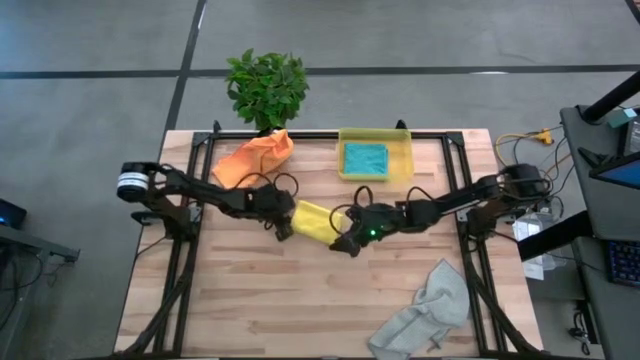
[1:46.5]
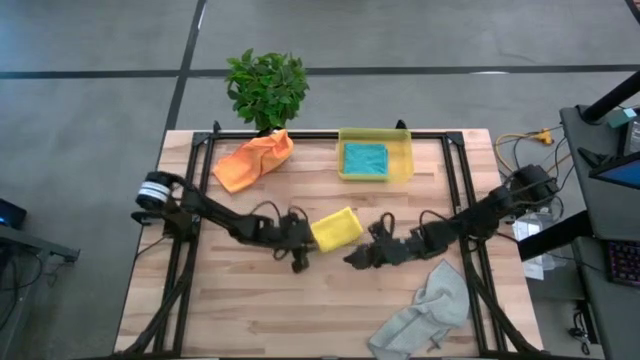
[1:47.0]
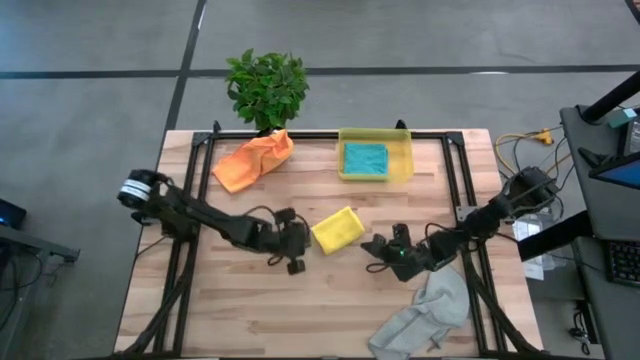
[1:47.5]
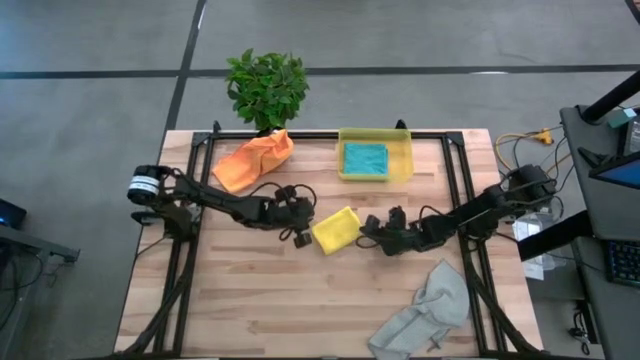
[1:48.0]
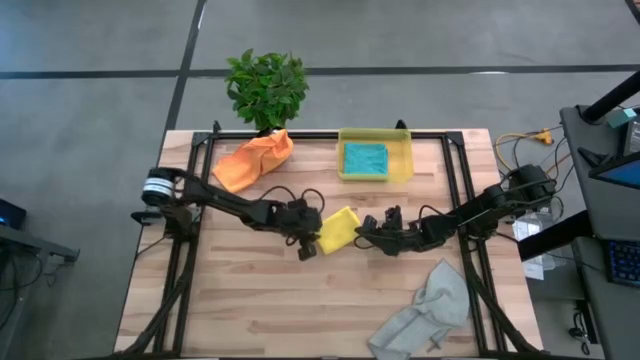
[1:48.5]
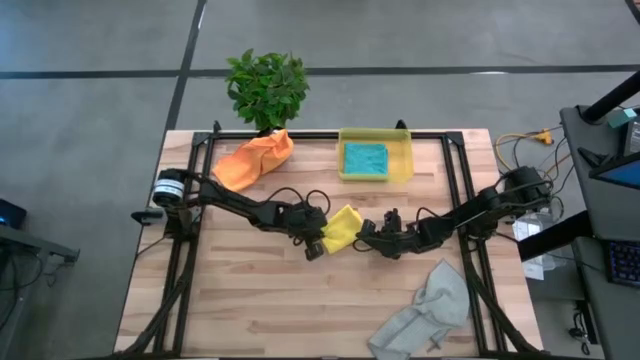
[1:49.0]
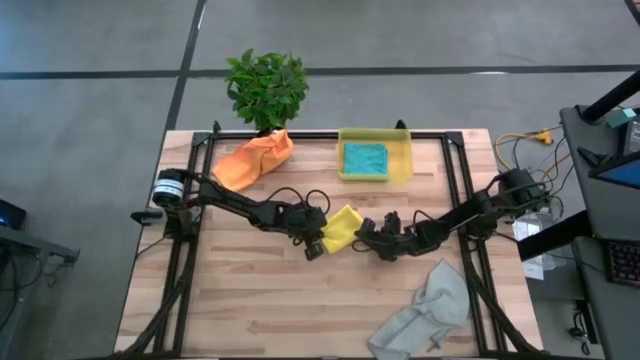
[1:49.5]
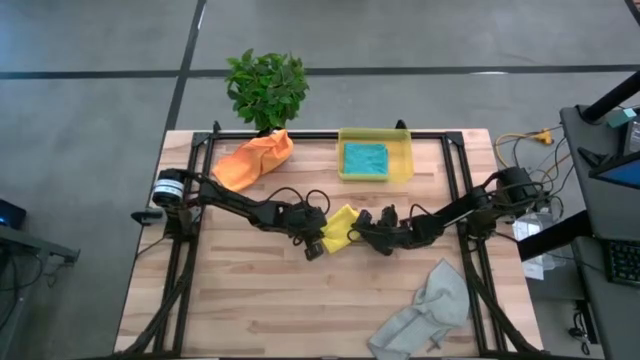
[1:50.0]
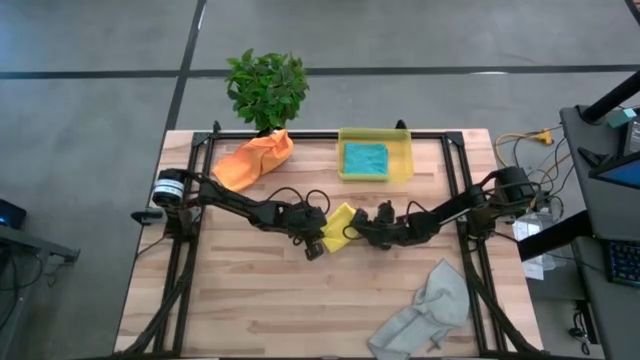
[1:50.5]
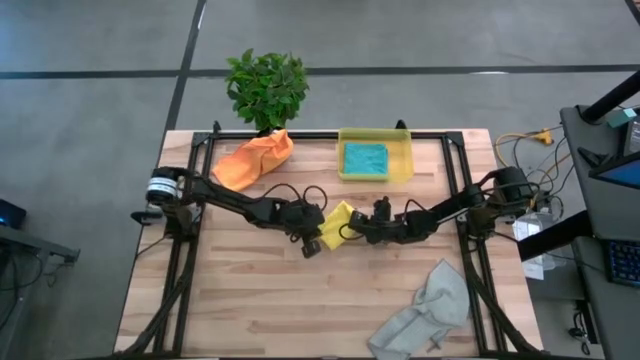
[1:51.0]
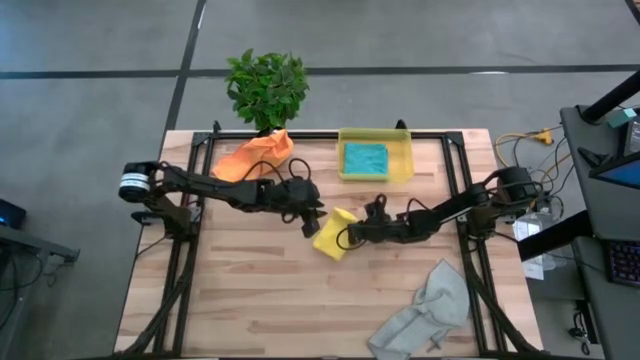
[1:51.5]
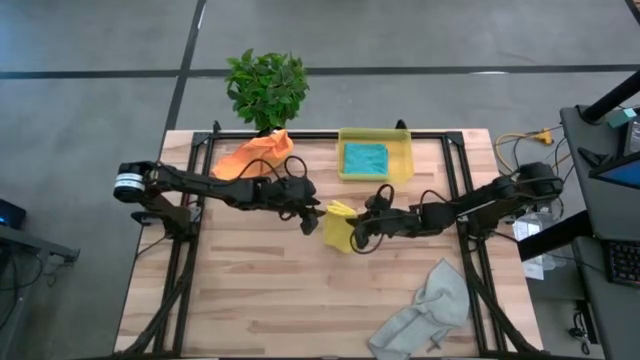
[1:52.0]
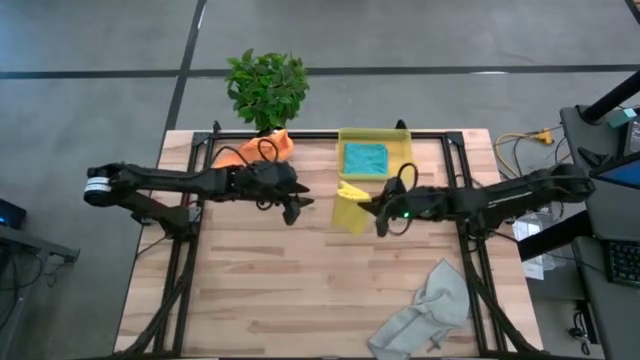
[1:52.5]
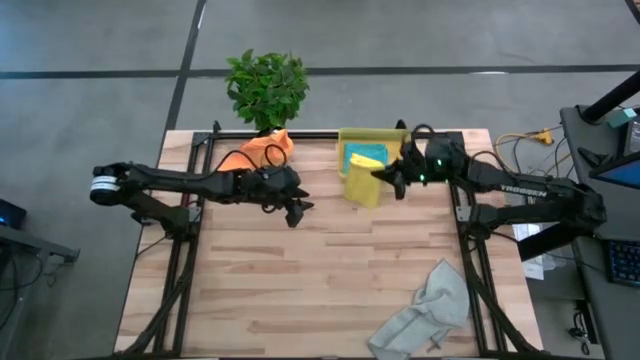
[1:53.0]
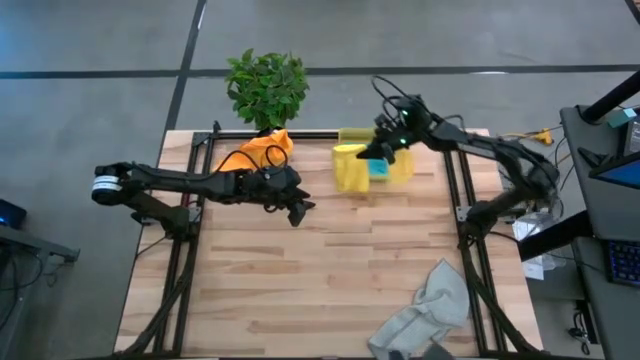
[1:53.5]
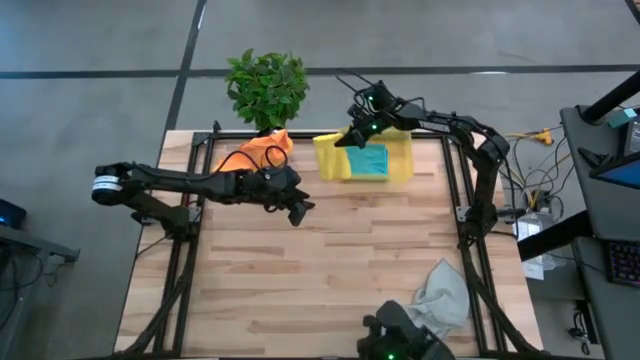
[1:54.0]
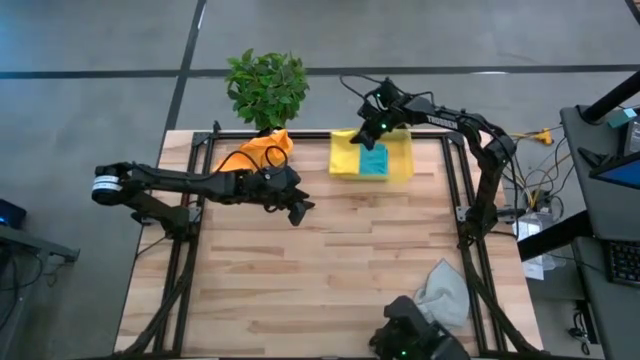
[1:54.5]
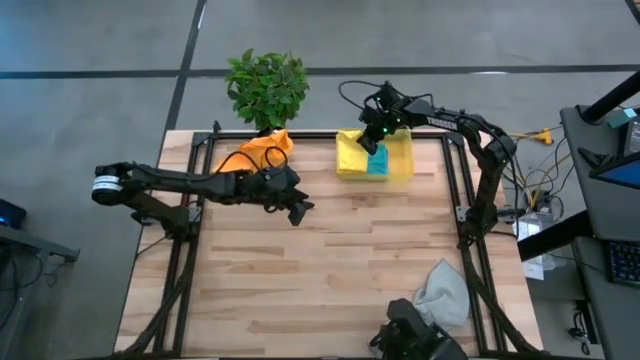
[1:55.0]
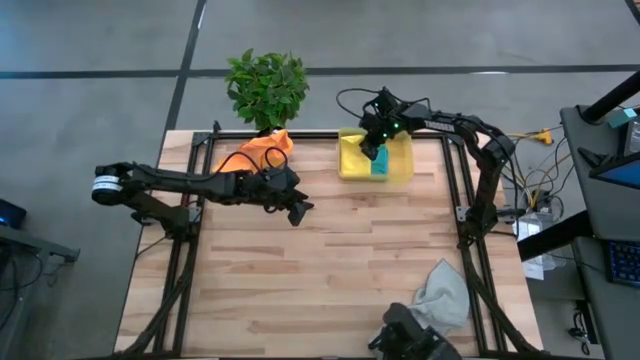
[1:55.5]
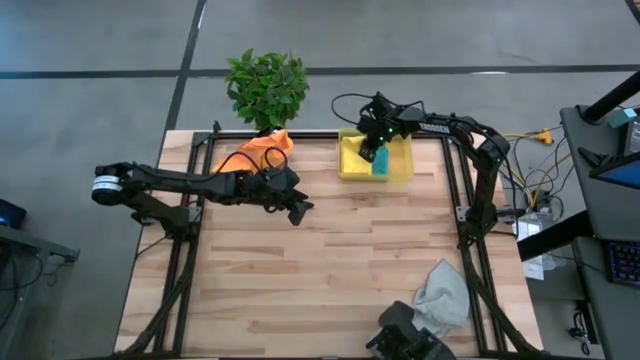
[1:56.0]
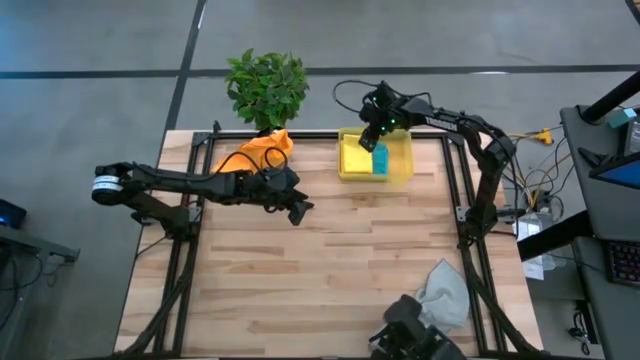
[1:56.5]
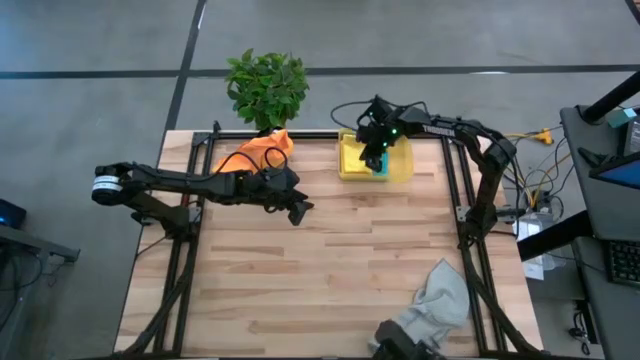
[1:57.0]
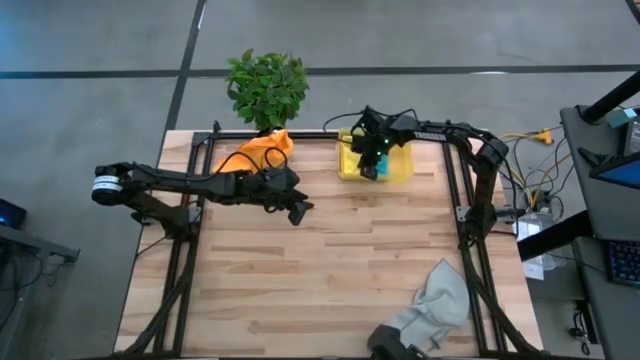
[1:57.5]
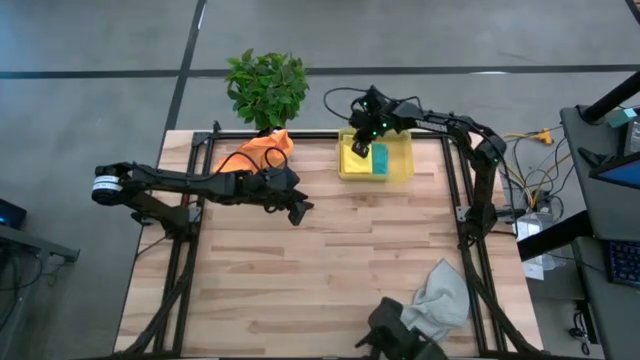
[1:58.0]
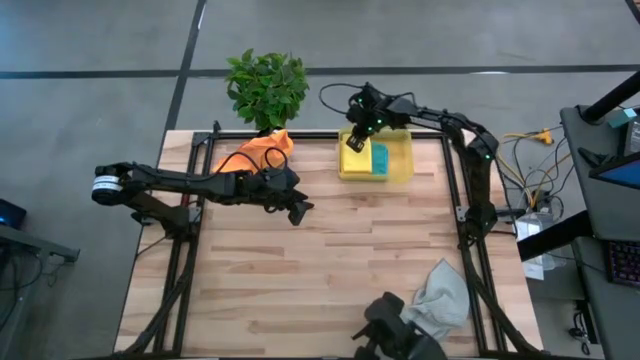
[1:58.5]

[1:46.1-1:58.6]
Task: Fold microfiber towels
Put the folded yellow microfiber towel into the yellow bin

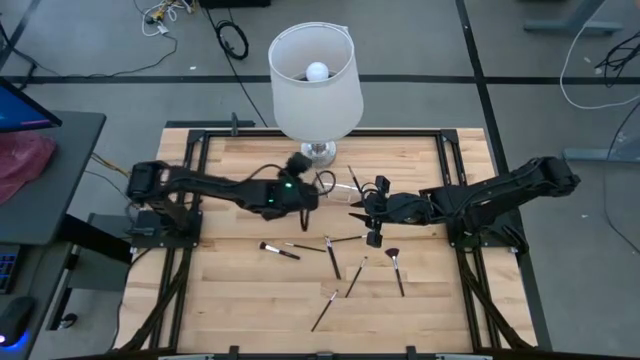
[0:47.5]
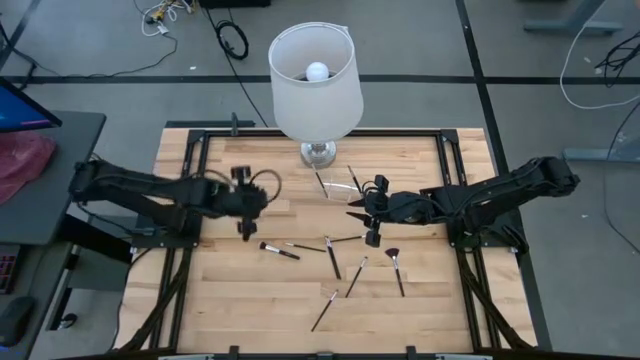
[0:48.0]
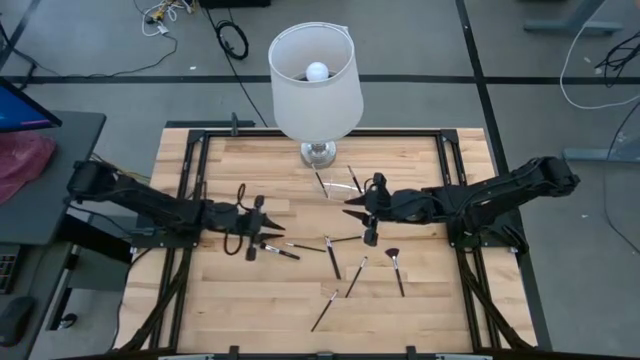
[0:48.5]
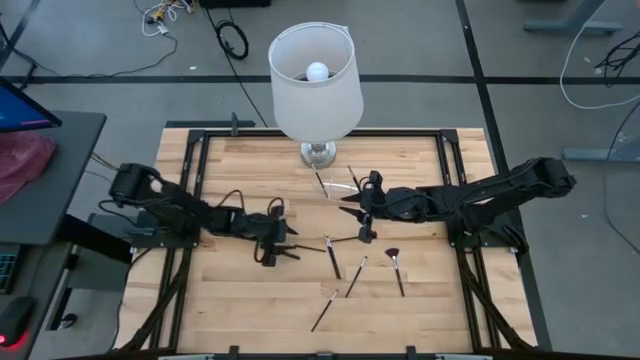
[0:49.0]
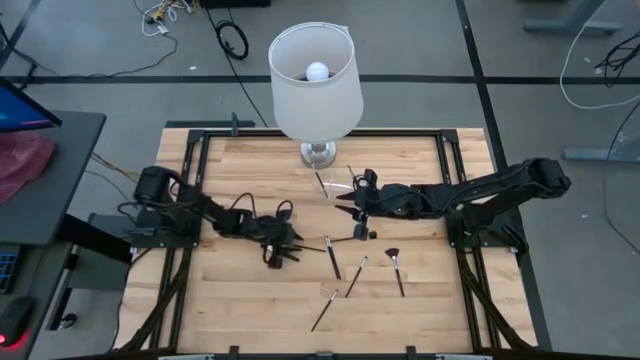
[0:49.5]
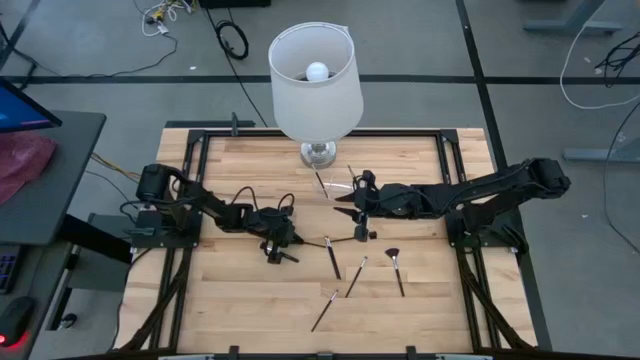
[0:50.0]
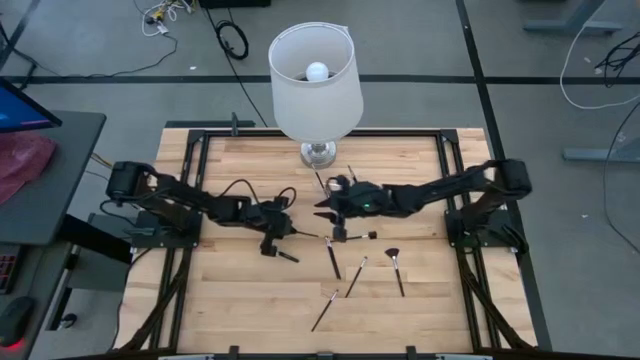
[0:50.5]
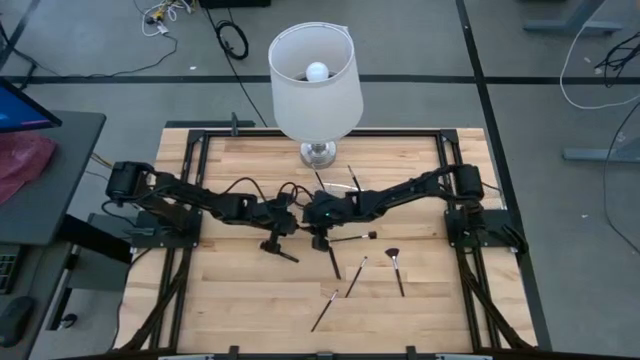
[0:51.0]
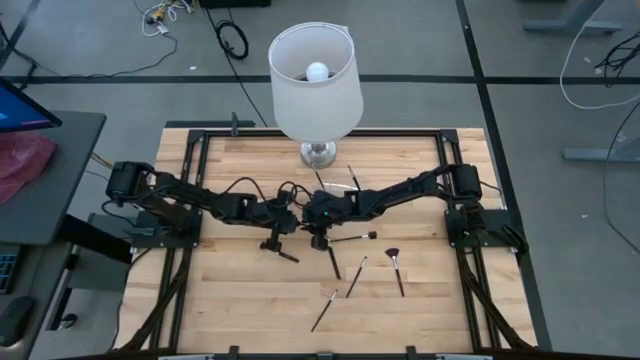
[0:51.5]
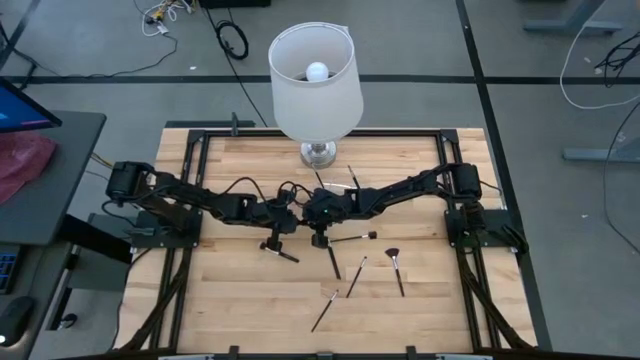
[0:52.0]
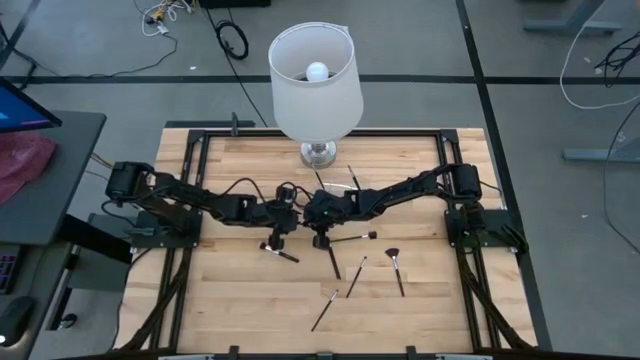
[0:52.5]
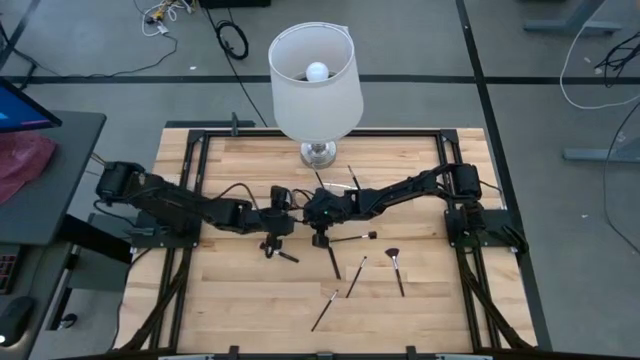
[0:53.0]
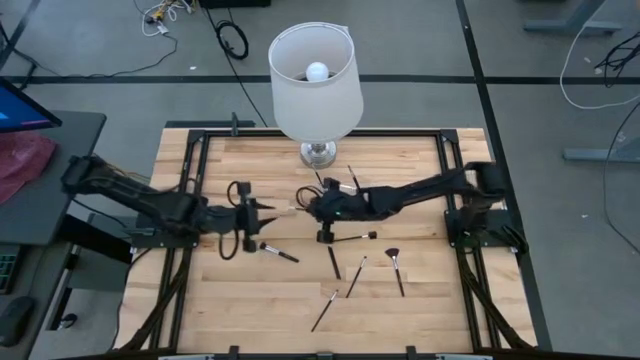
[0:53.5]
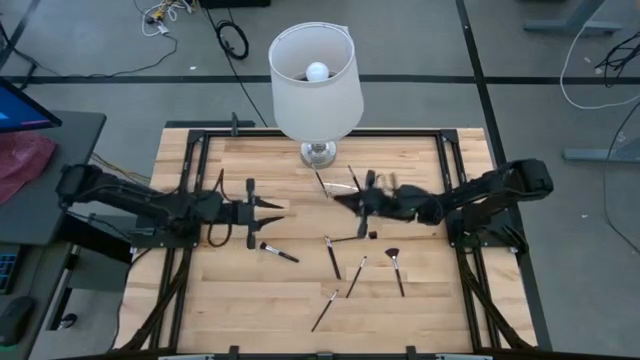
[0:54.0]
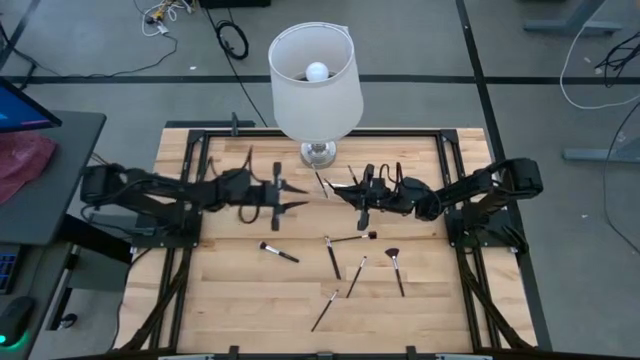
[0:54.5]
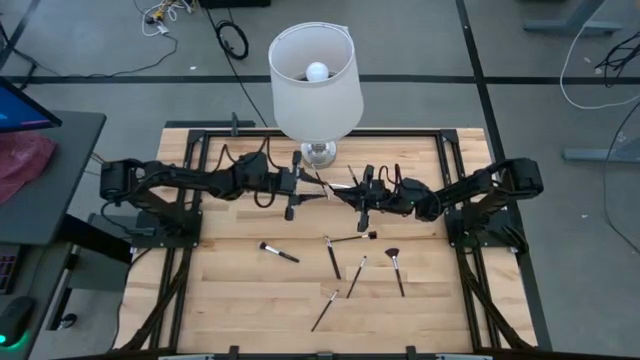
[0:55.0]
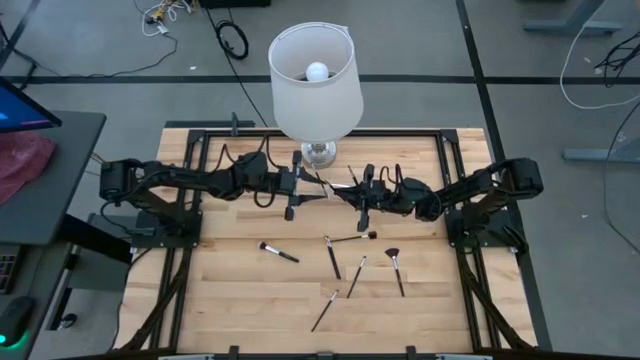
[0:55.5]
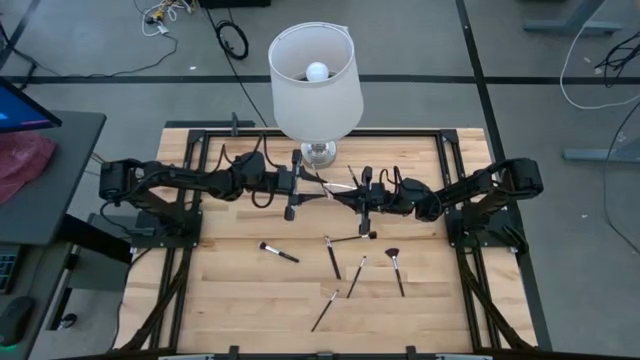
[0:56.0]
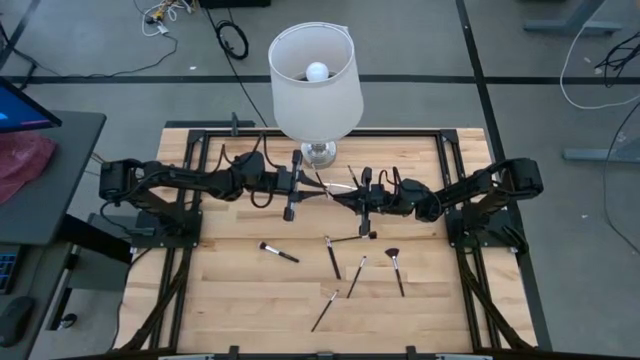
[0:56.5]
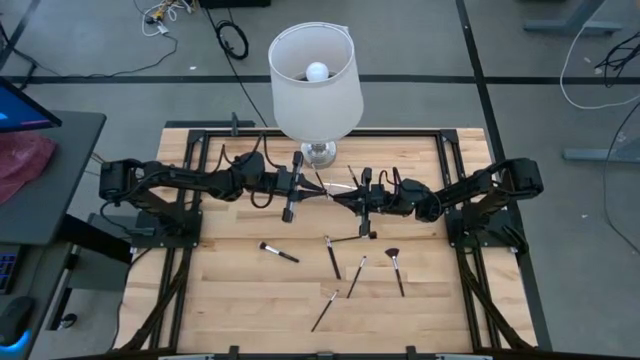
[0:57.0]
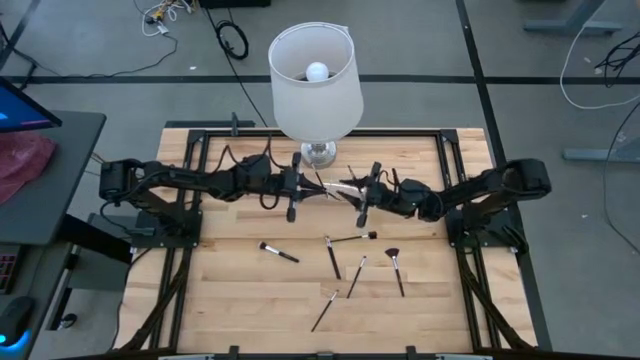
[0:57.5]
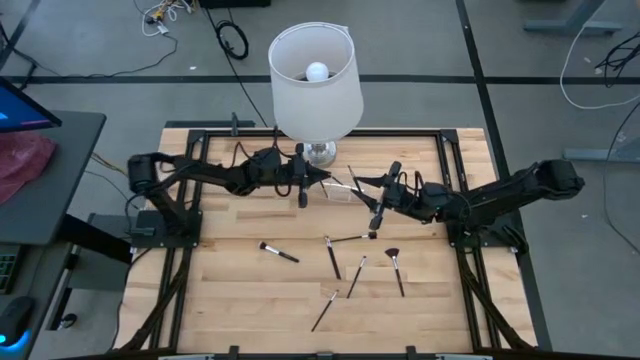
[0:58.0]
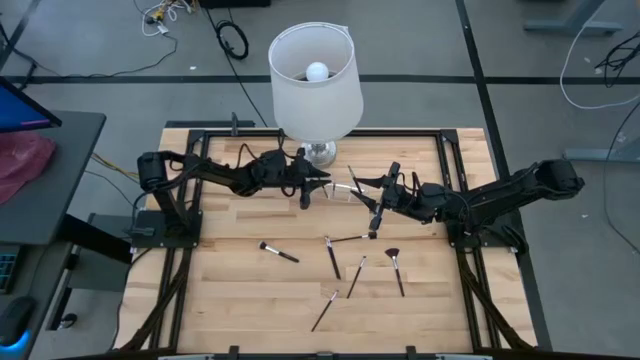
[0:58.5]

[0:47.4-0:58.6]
Task: Put items in baskets/containers
Put the black liner brush into the transparent organizer
